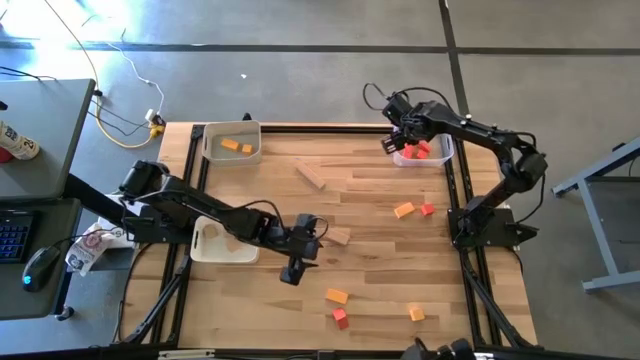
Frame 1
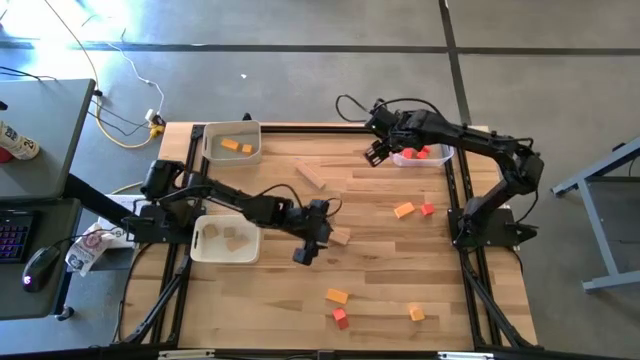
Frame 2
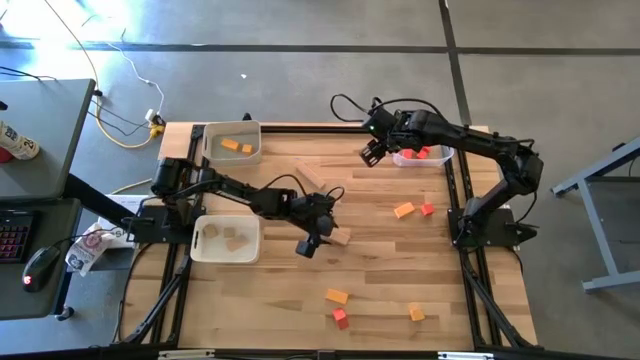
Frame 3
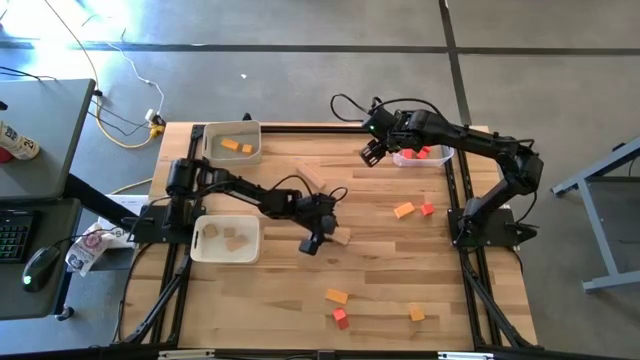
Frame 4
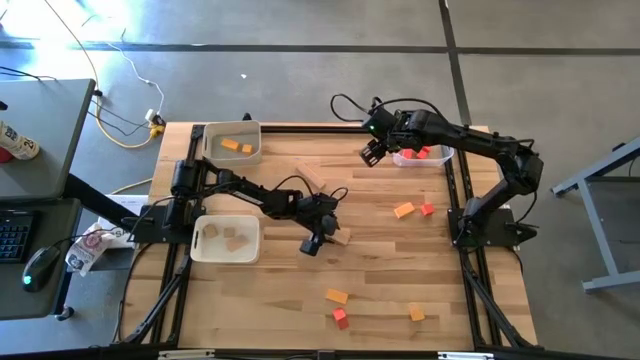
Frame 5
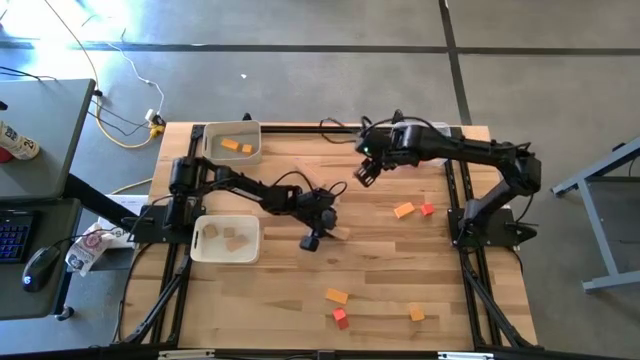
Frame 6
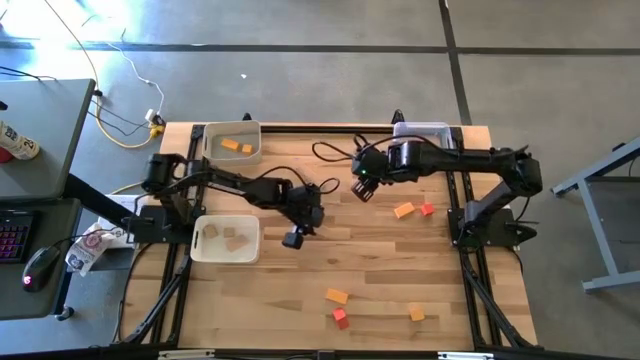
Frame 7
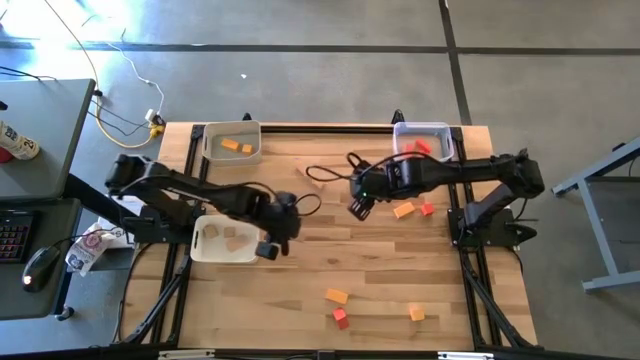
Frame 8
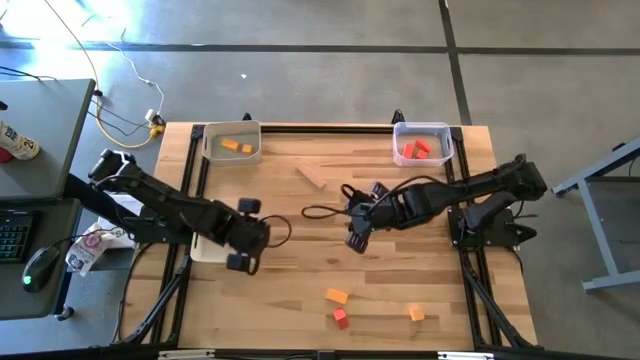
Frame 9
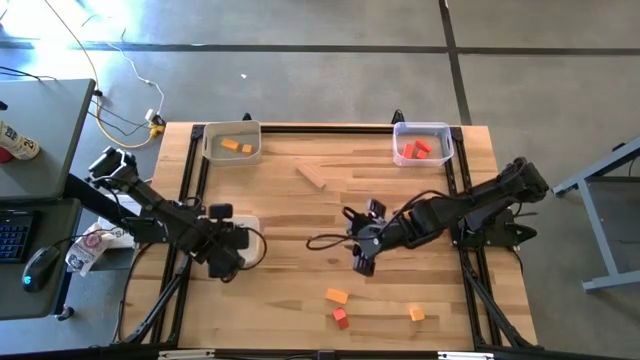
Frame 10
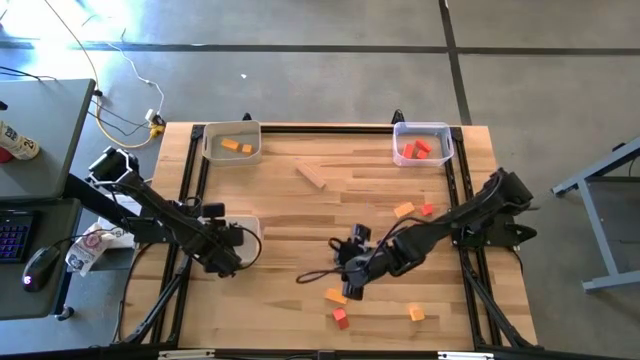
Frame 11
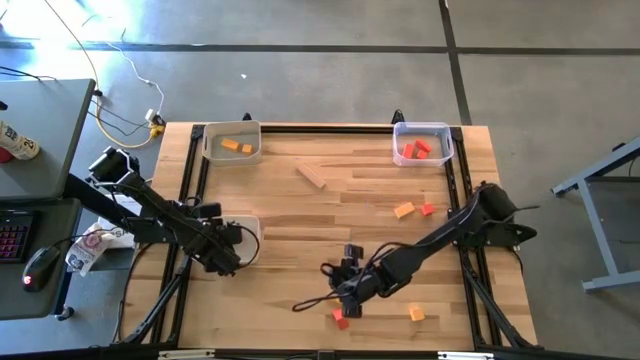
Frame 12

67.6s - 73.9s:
Task: Sort & place blocks by color
Put the brown block into the white bin

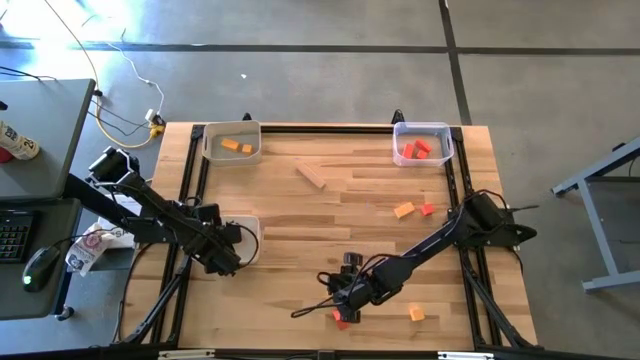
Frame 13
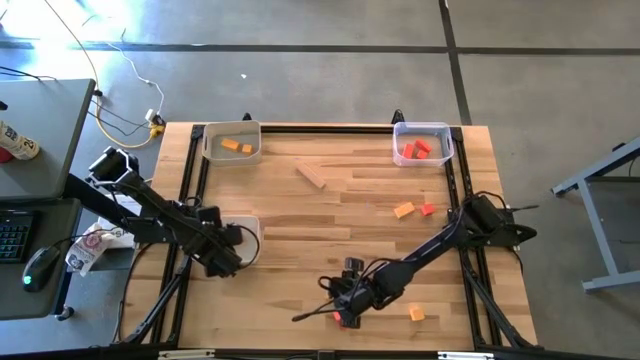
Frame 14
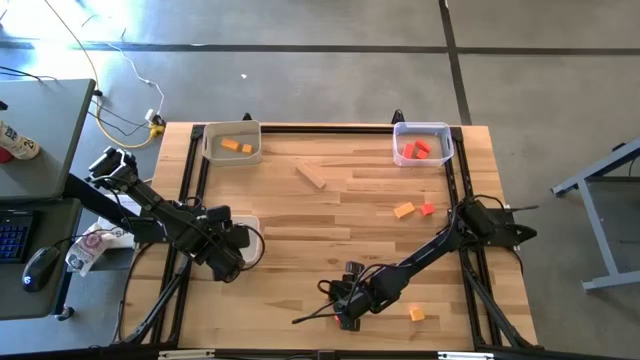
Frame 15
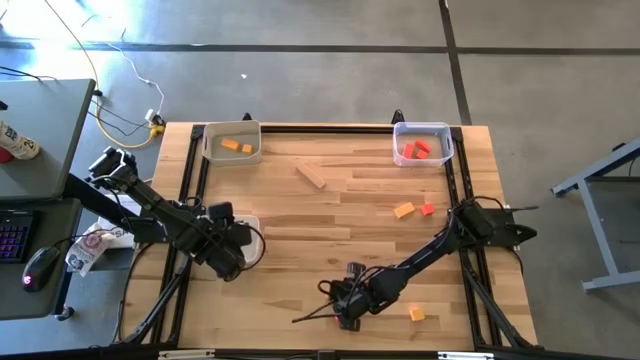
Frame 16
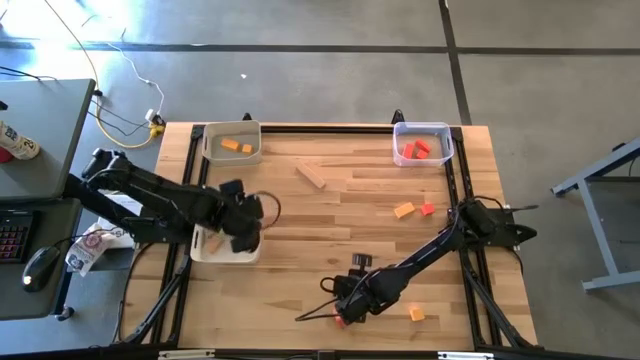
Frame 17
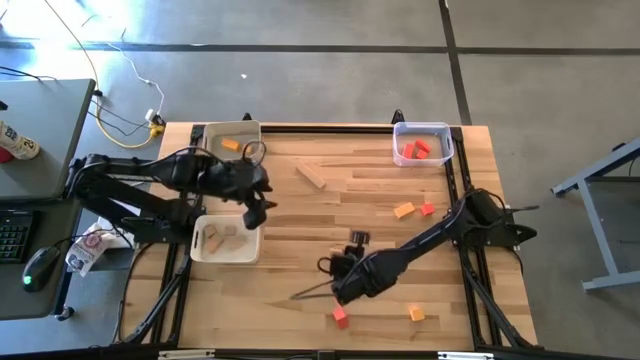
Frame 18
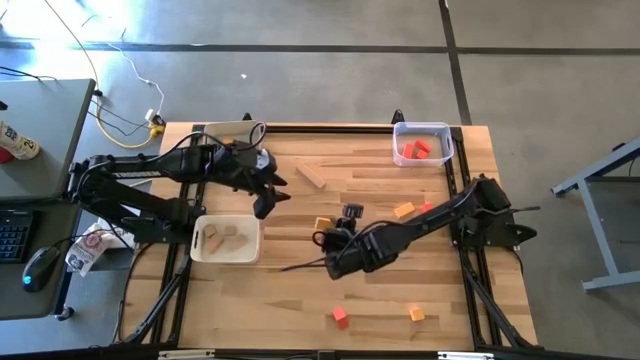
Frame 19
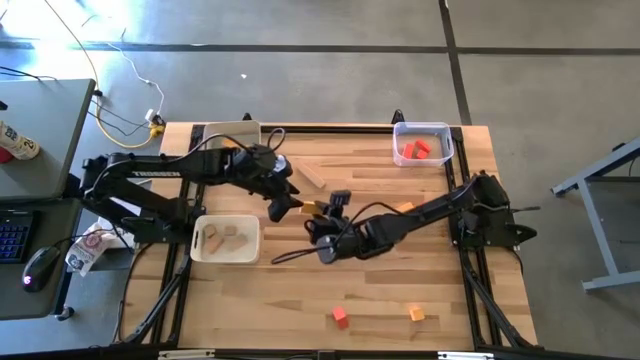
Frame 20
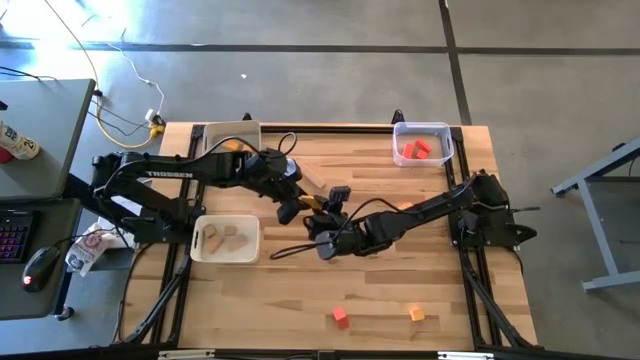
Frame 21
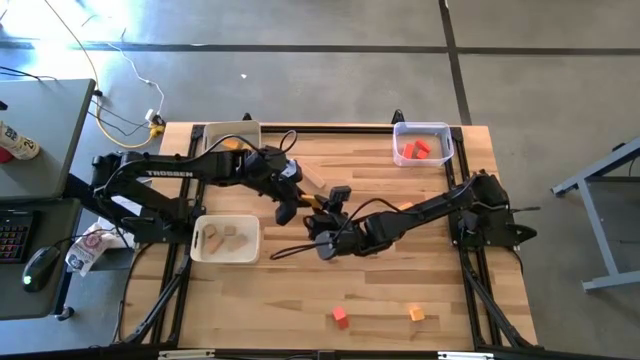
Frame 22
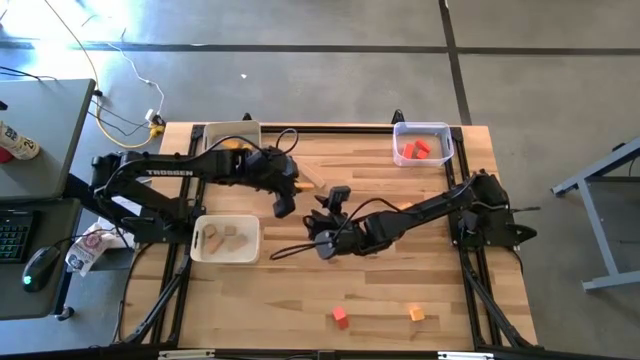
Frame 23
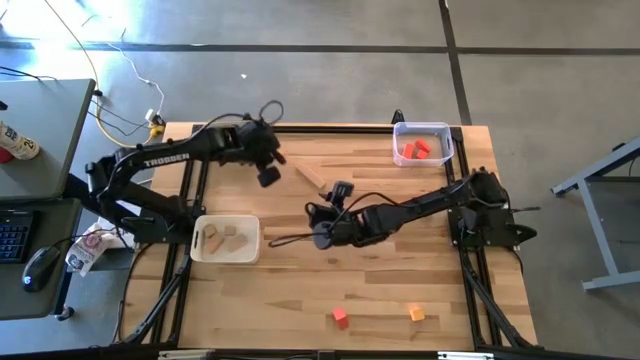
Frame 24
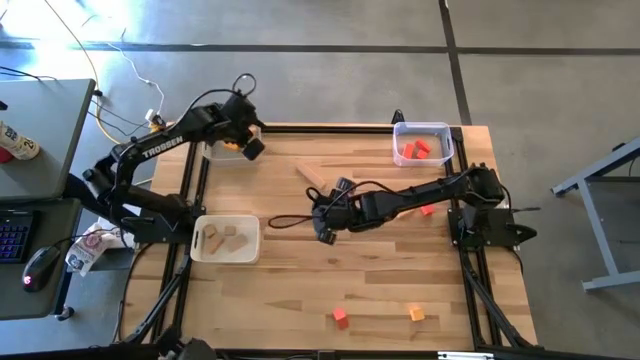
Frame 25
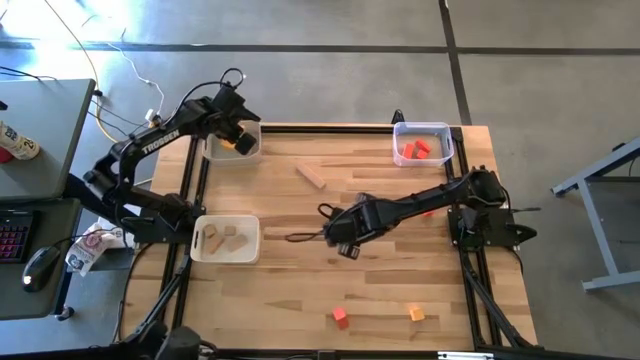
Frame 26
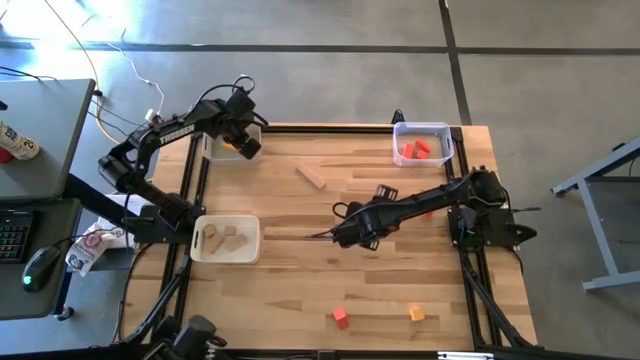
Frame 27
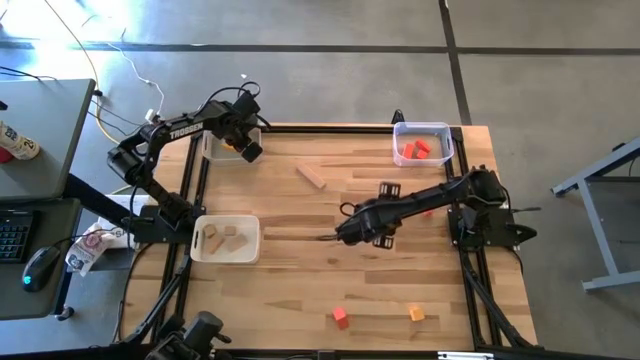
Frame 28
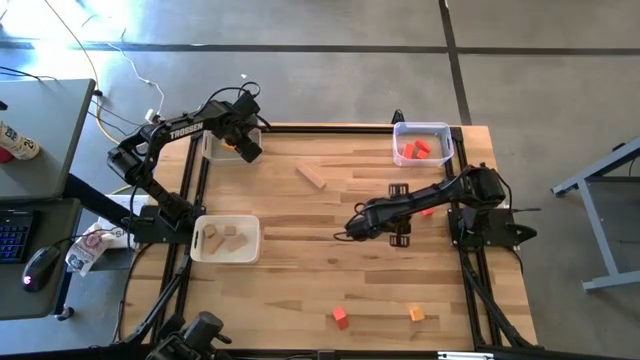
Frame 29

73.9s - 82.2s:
Put the yellow block into the gray bin

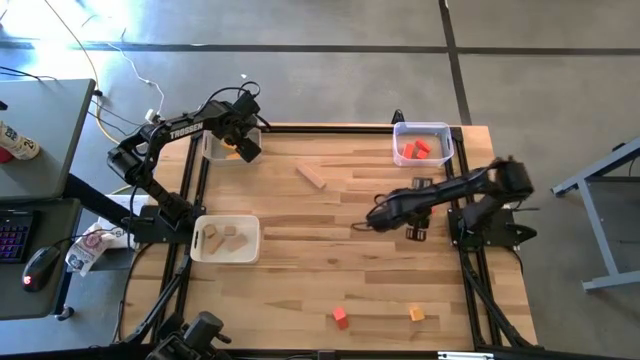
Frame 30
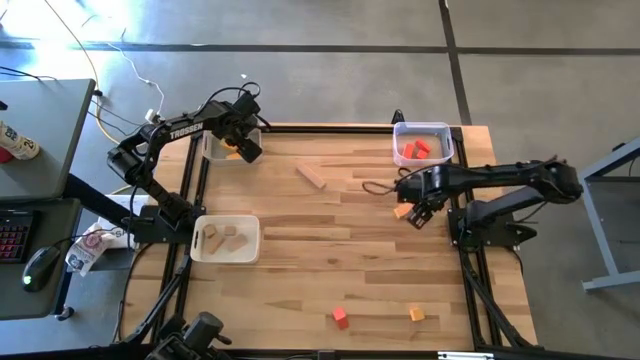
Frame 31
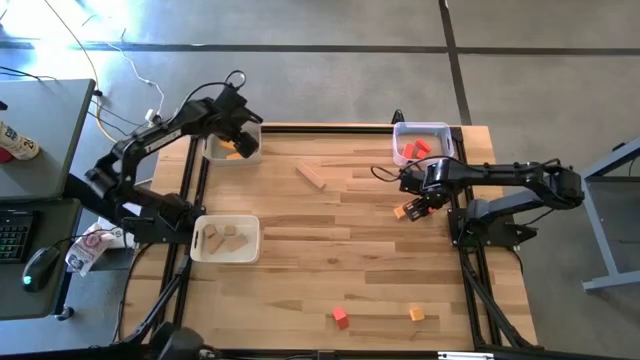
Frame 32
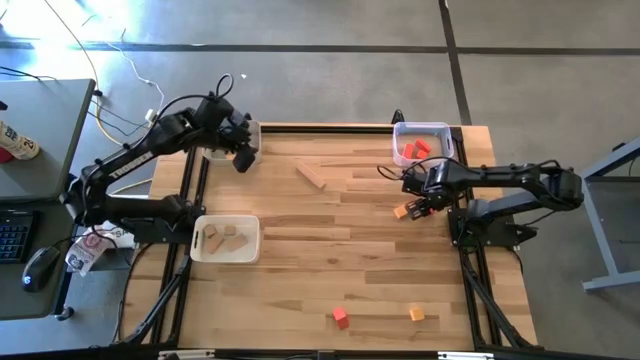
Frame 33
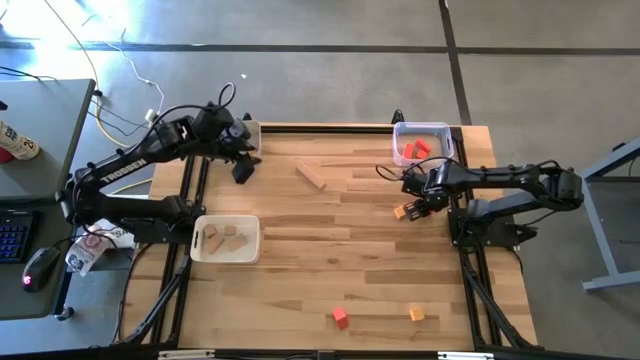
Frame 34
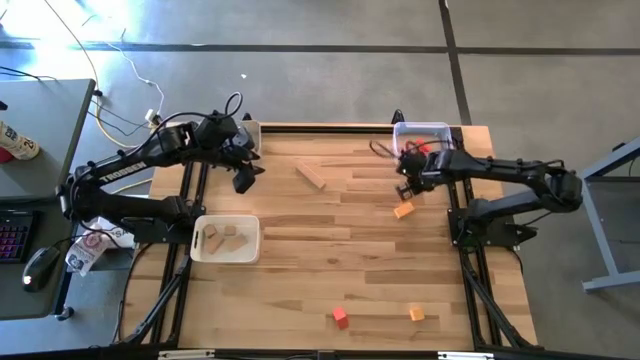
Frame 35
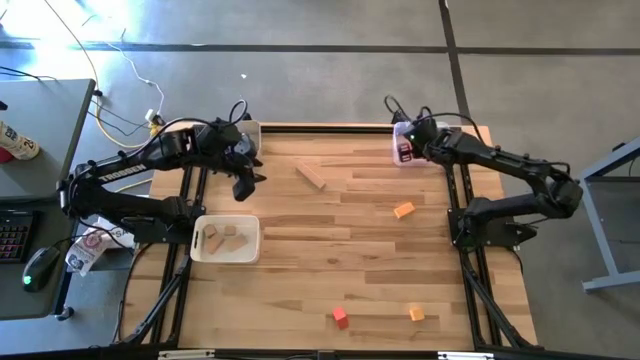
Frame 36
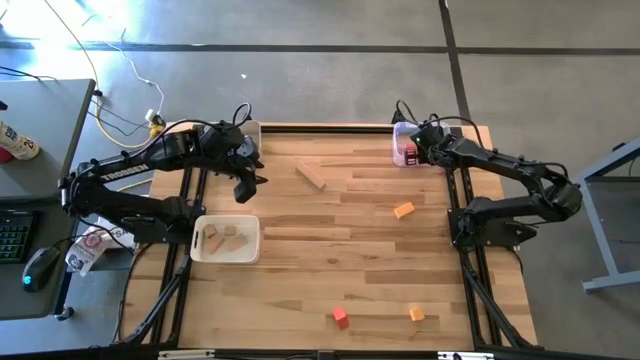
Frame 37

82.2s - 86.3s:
Put the orange block into the transparent bin

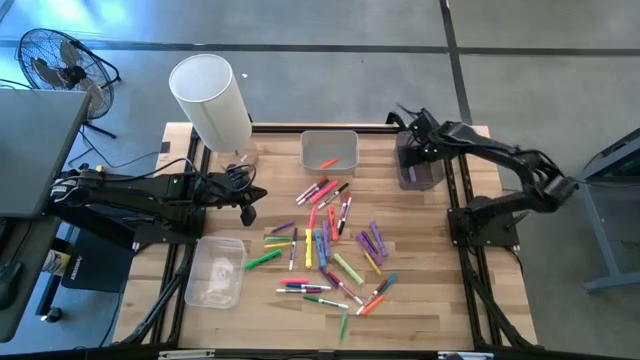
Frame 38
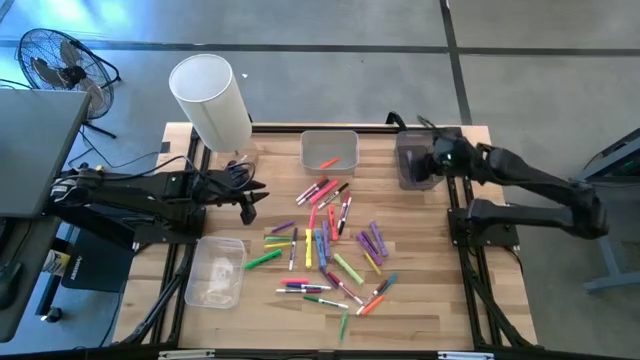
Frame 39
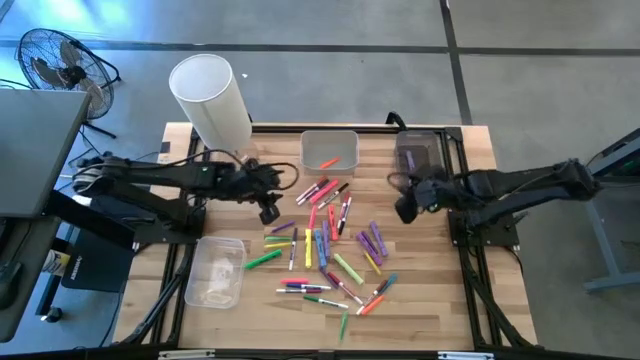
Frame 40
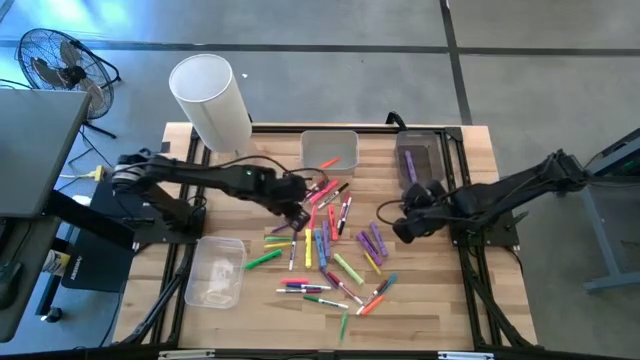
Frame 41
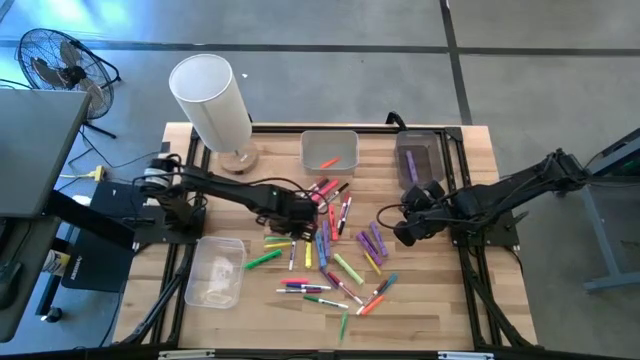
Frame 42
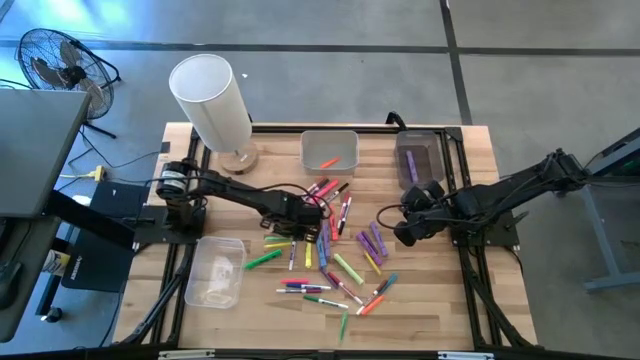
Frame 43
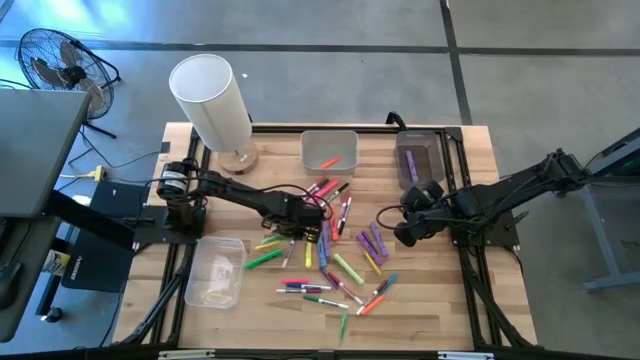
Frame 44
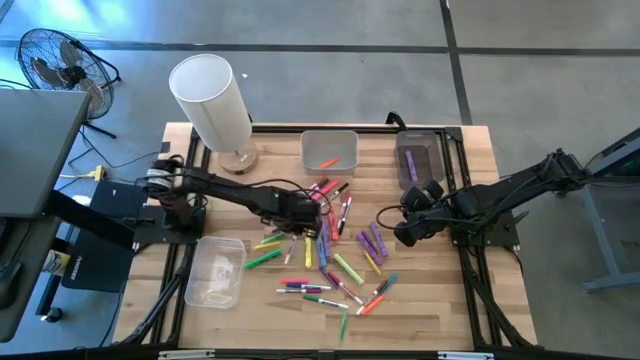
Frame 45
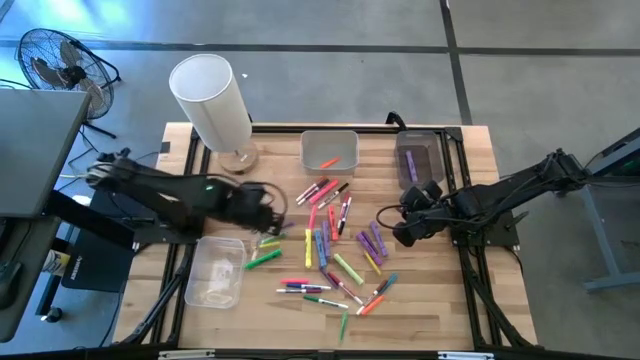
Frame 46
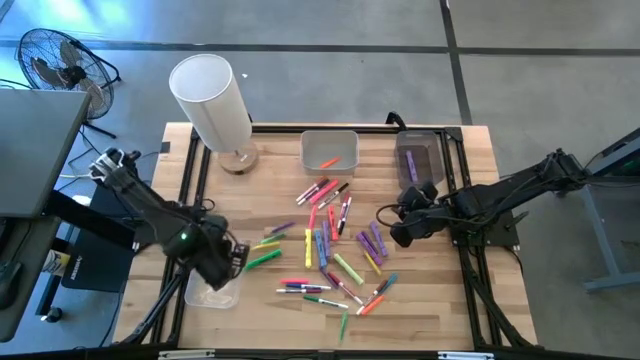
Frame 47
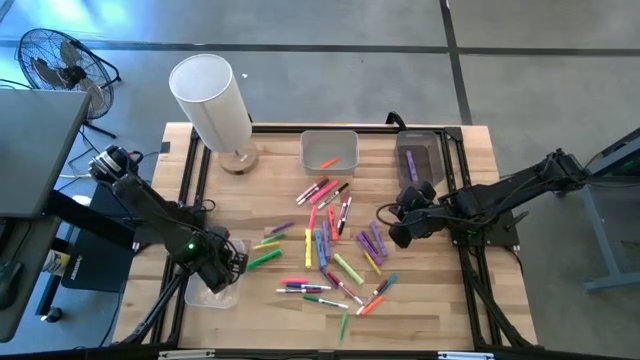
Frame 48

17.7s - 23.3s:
Task: Pick & Place Markers
Put the blue marker pen into the transparent bin
